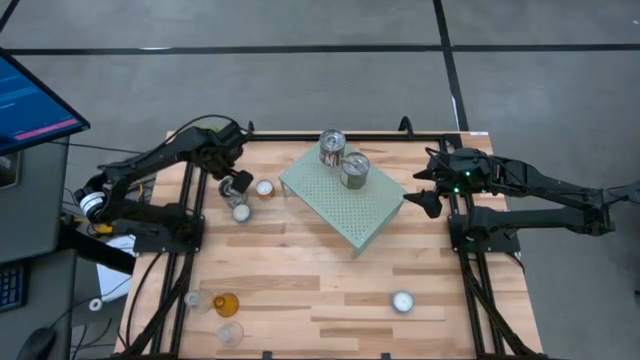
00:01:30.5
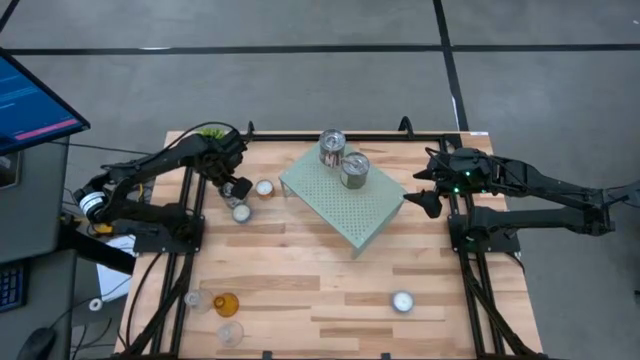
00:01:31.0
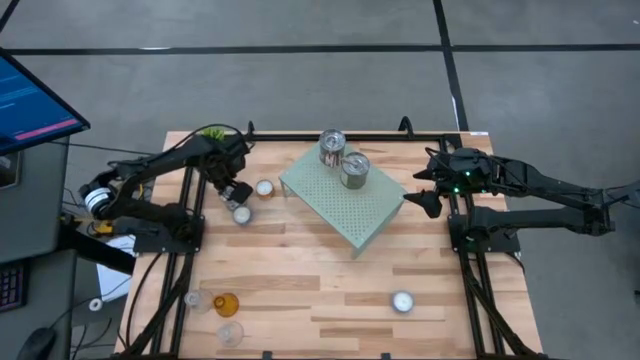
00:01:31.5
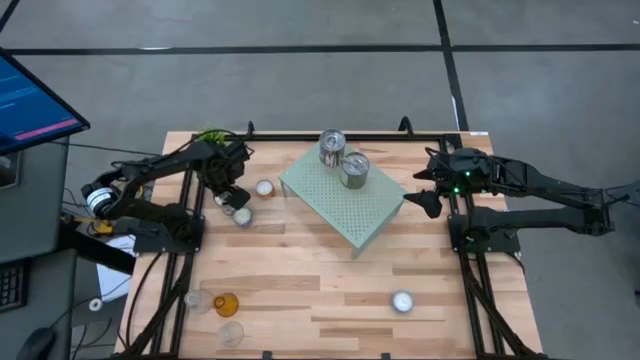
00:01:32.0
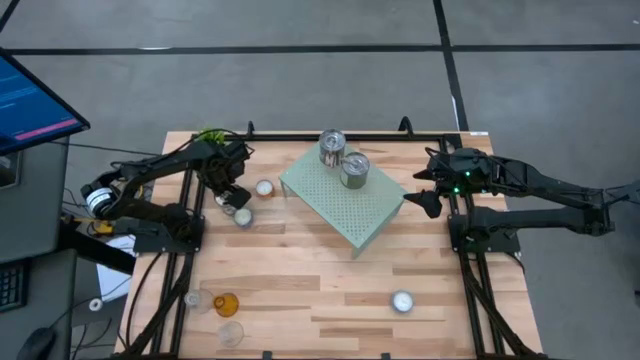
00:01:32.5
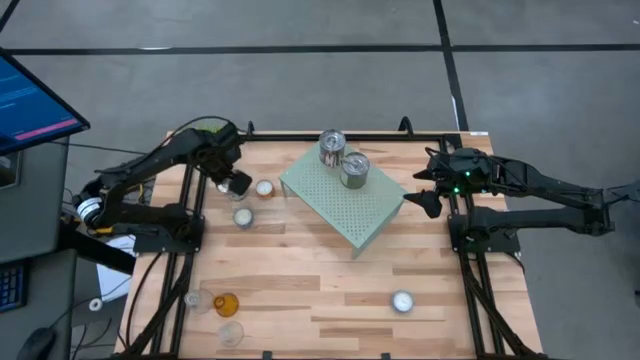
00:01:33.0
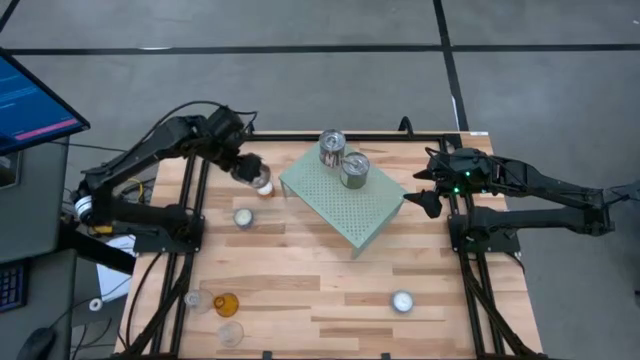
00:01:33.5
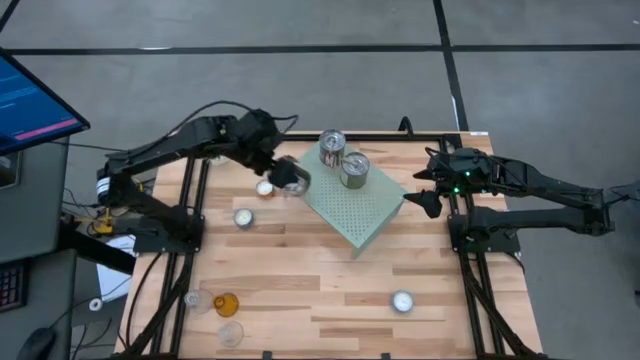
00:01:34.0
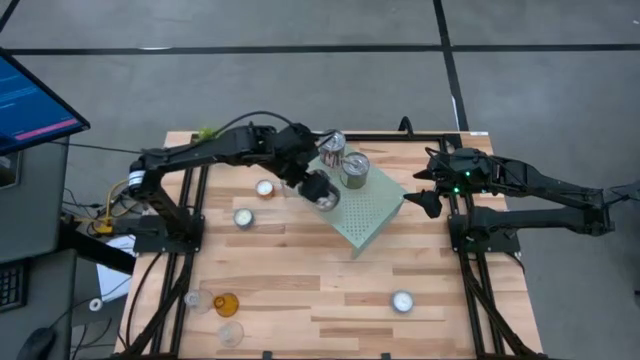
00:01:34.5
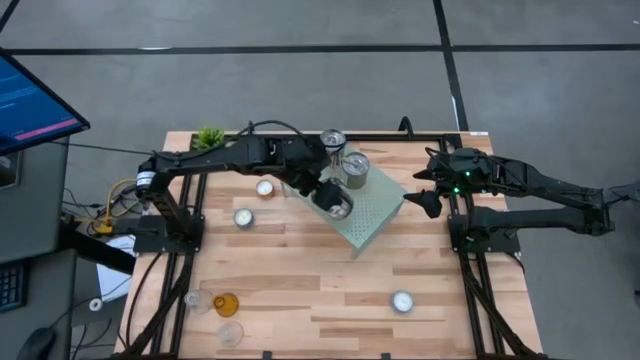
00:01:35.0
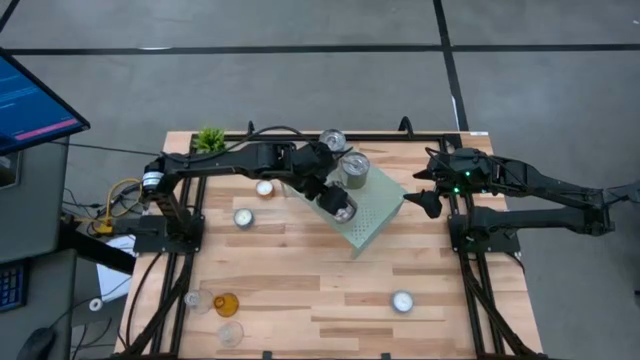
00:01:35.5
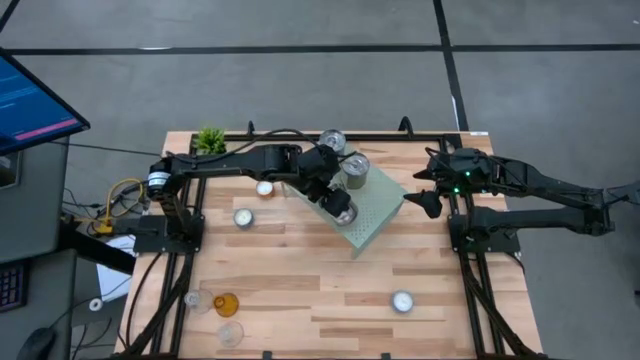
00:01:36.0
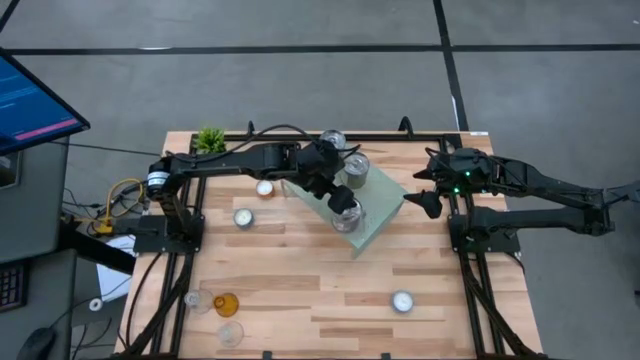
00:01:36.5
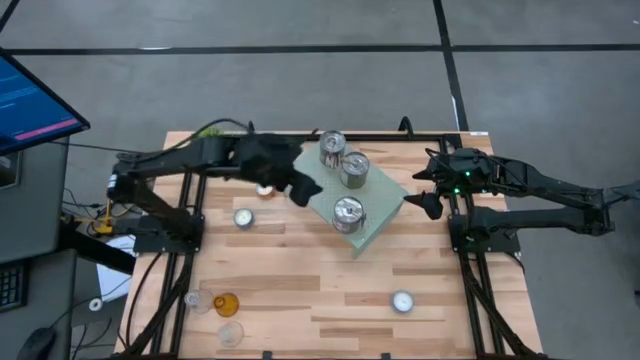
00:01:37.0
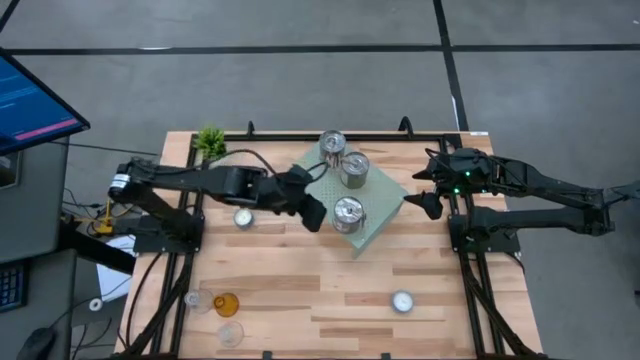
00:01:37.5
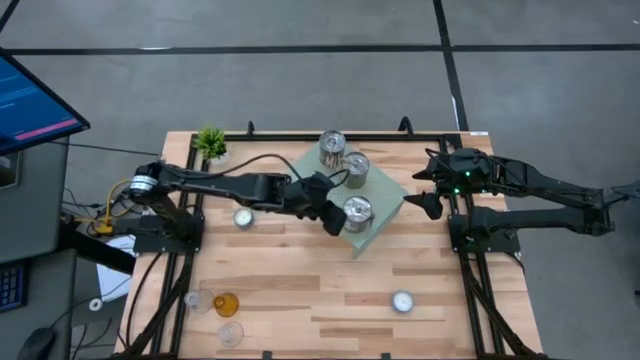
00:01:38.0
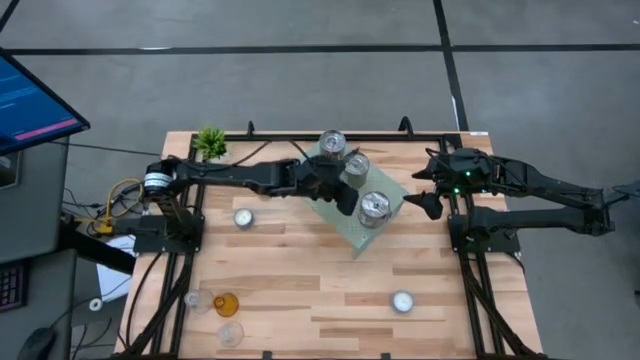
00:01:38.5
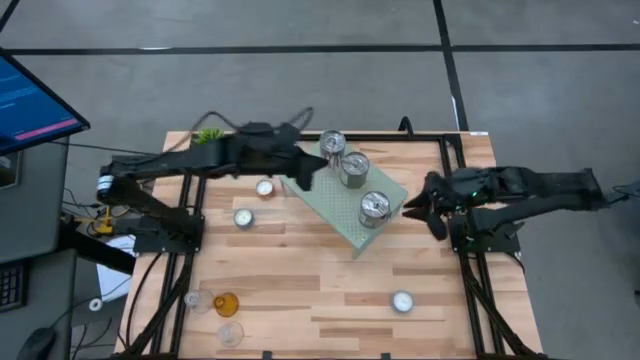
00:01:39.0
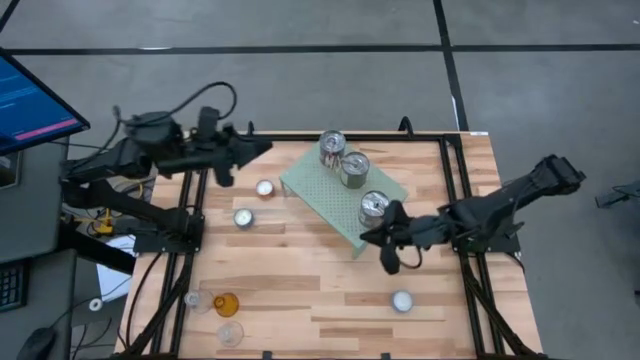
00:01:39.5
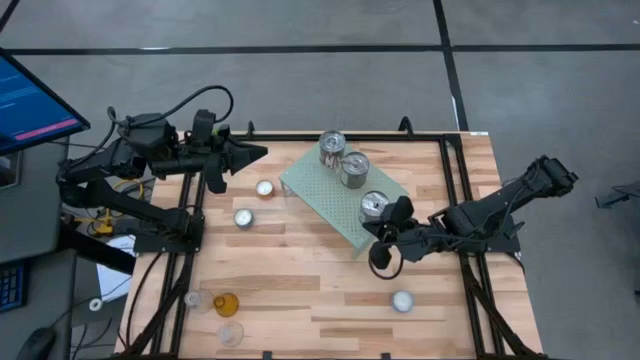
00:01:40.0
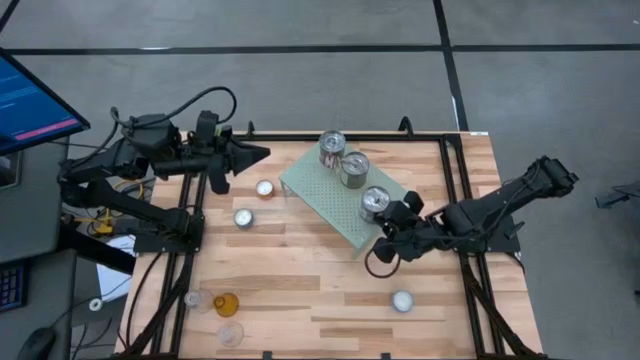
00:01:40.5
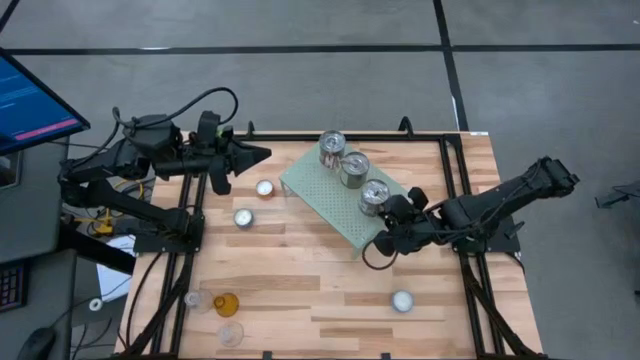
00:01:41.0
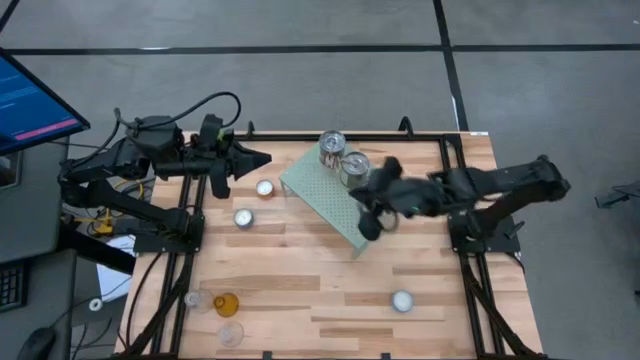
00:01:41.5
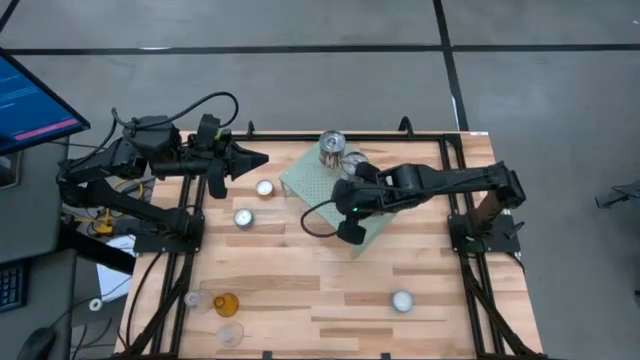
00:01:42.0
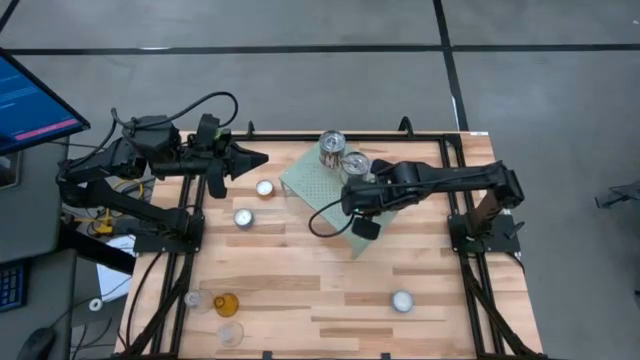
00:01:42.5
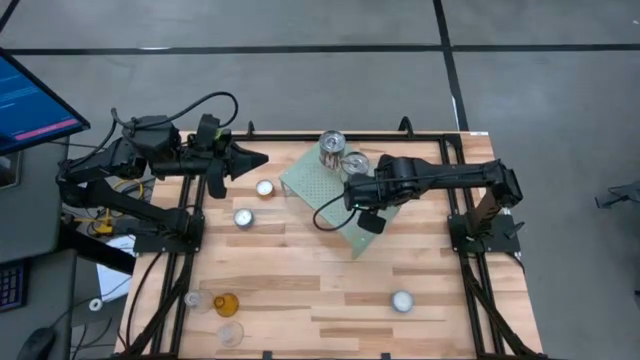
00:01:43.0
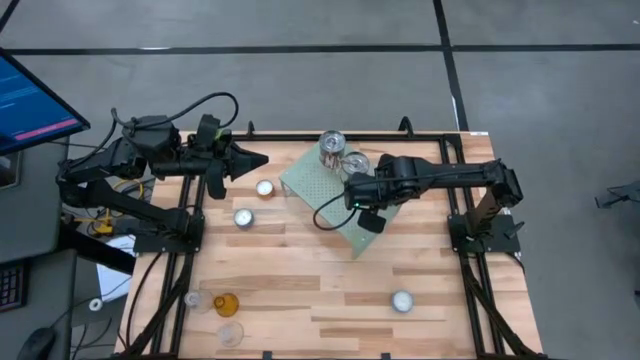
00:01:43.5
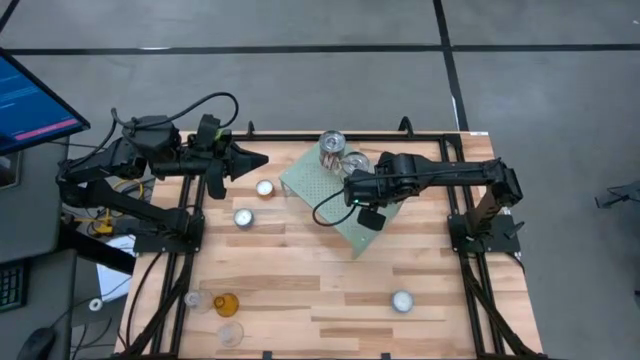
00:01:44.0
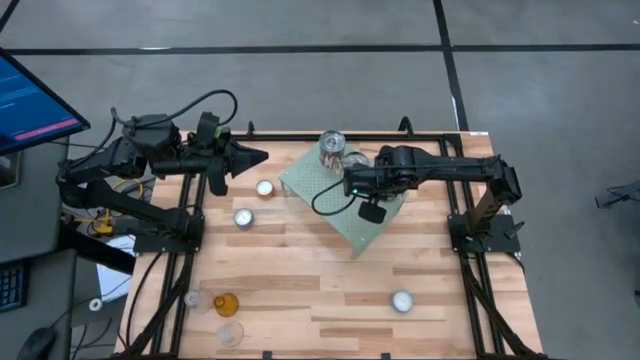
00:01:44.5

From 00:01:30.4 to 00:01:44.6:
Task: Stock candles on shelf
Put the silver scented candle on the shelf

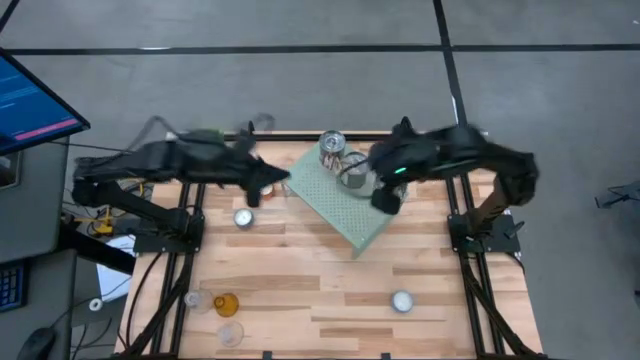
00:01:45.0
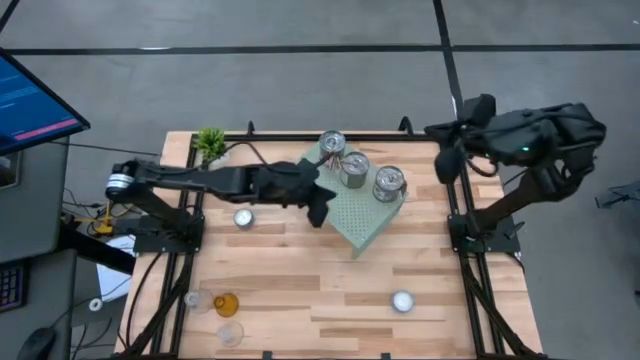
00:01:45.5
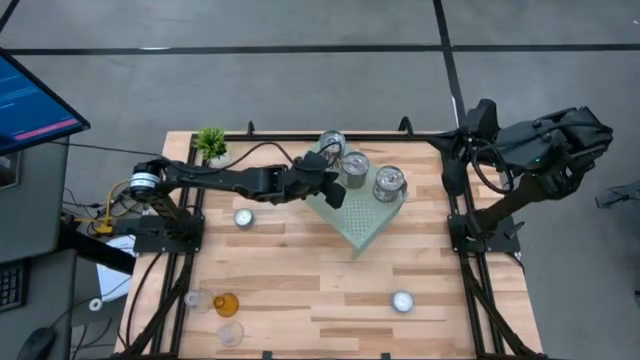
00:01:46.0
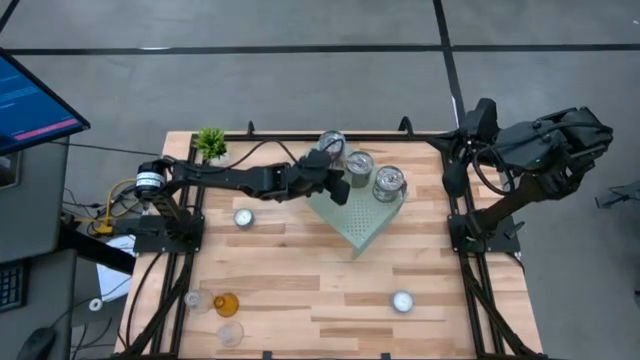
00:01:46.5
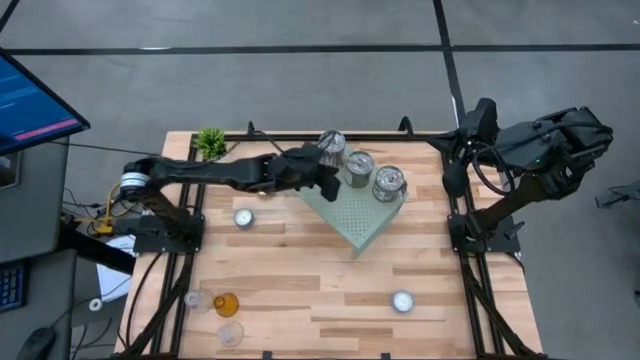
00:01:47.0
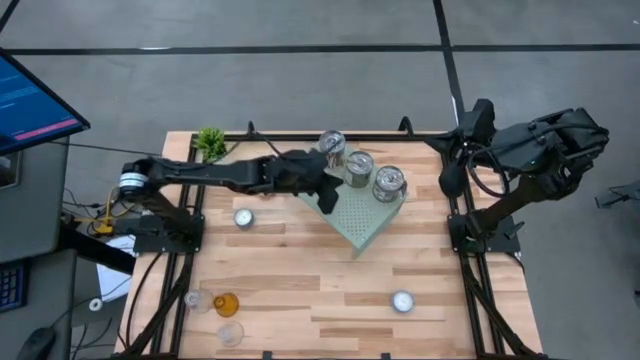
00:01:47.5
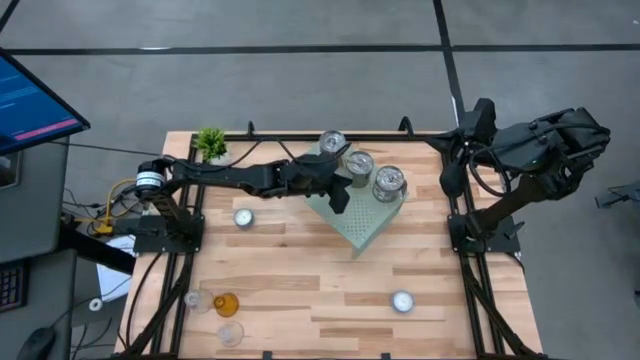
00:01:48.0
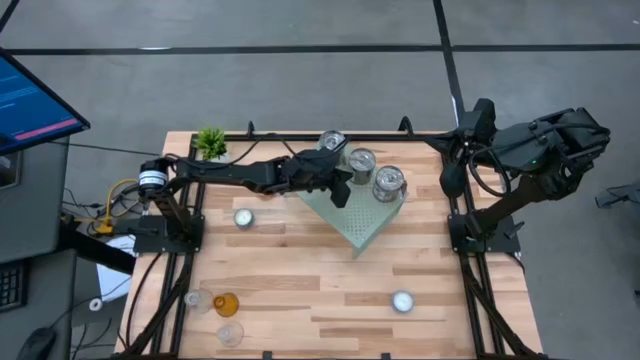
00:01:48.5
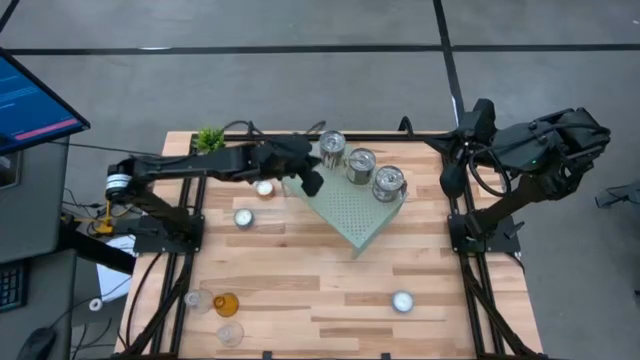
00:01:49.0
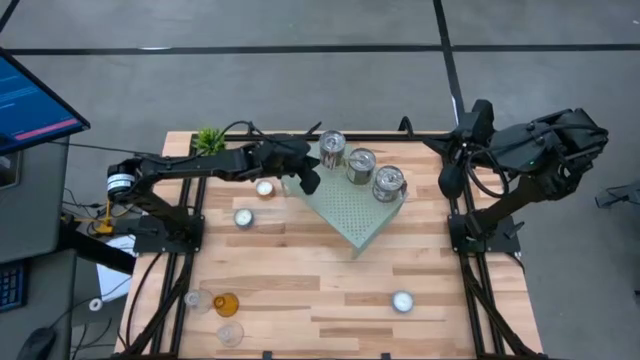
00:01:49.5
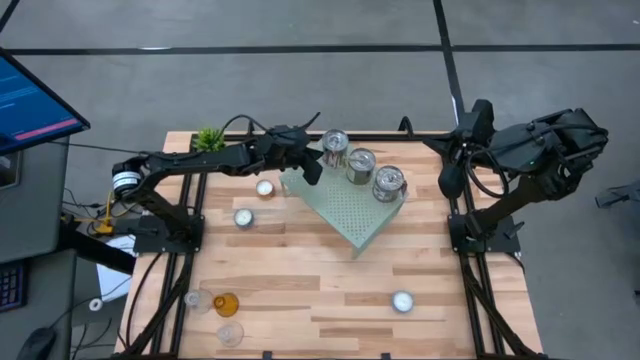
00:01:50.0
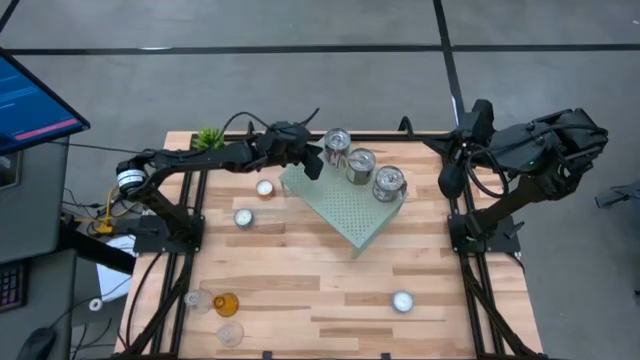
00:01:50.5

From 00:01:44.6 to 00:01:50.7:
Adjust the silver scented candles on the shelf

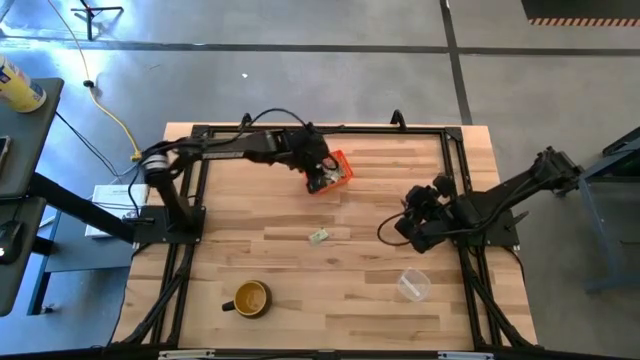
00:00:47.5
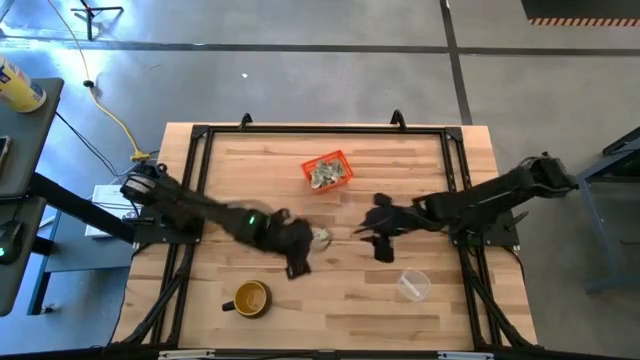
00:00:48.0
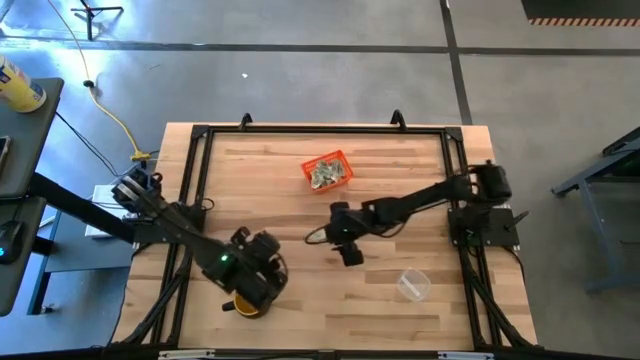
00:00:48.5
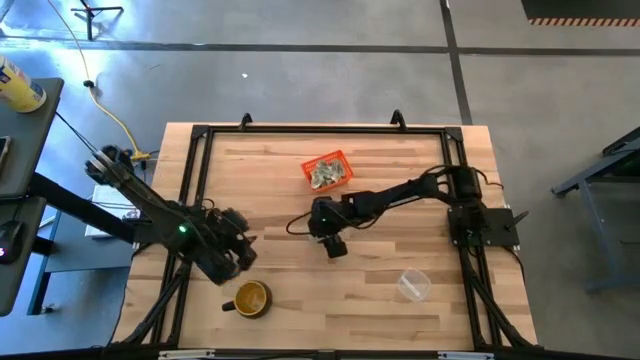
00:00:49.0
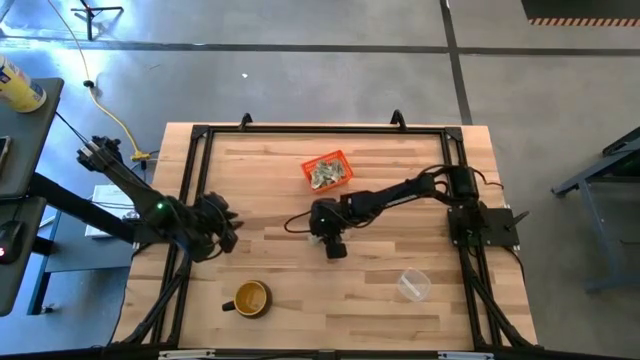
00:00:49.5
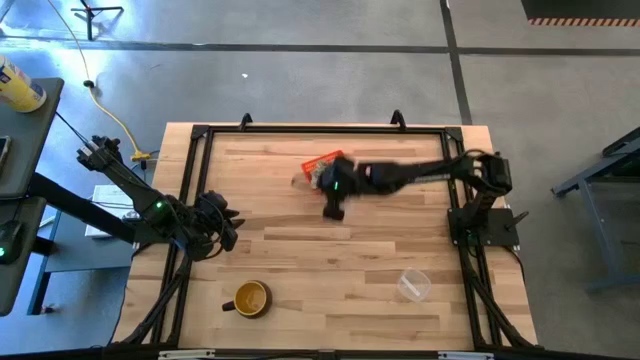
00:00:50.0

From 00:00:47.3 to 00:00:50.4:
Task: Pick and place items into bin
Put the white stevia packet into the orange bin
